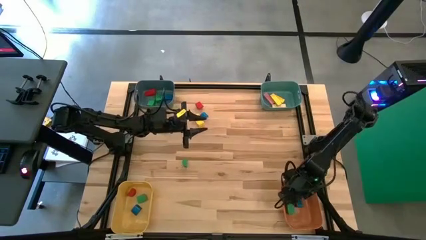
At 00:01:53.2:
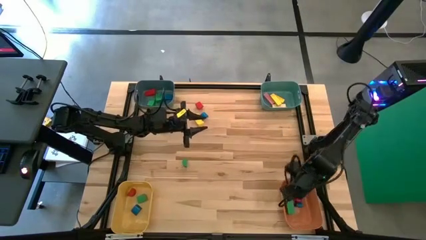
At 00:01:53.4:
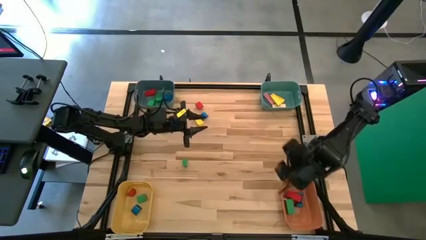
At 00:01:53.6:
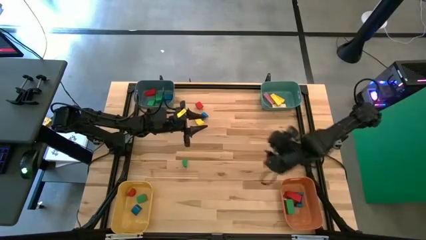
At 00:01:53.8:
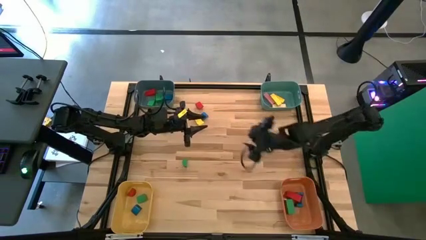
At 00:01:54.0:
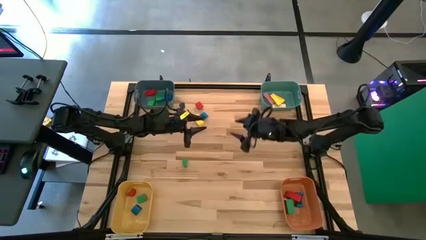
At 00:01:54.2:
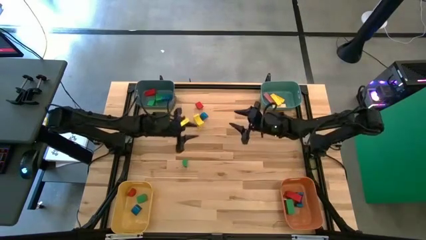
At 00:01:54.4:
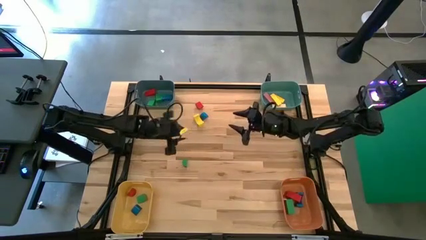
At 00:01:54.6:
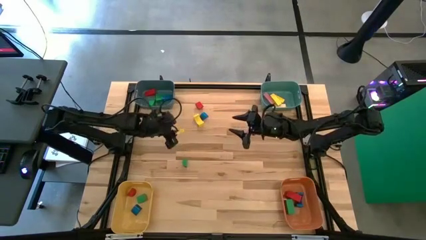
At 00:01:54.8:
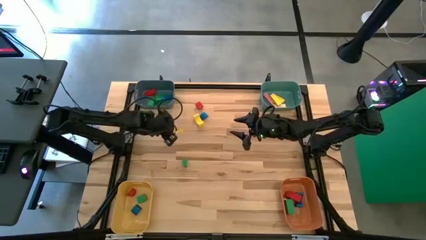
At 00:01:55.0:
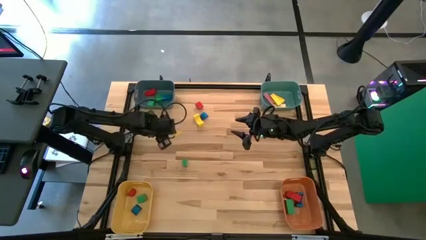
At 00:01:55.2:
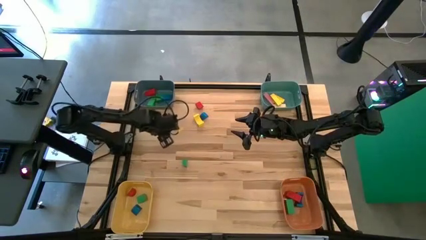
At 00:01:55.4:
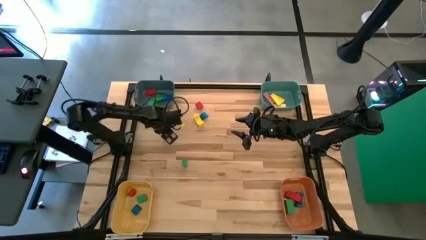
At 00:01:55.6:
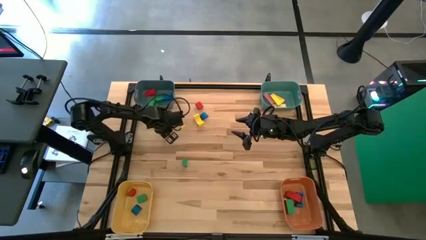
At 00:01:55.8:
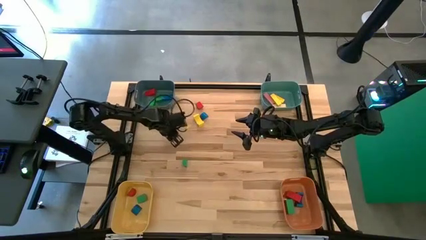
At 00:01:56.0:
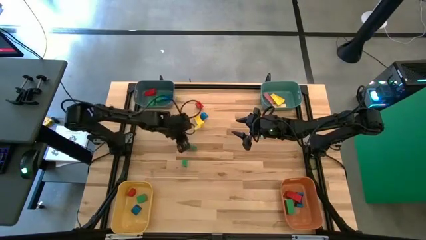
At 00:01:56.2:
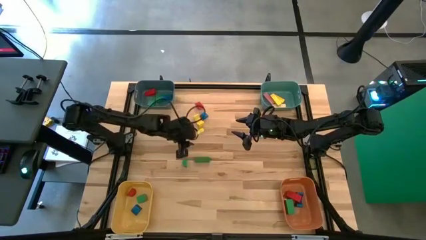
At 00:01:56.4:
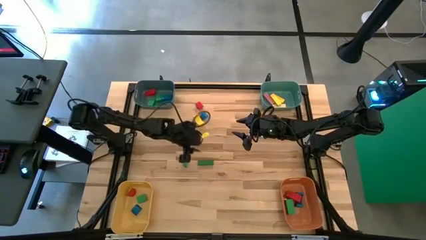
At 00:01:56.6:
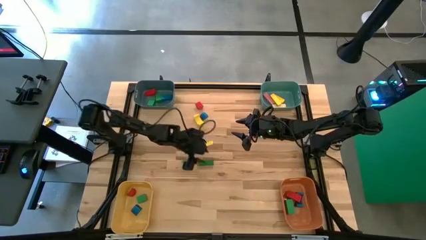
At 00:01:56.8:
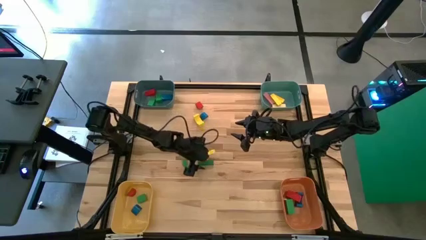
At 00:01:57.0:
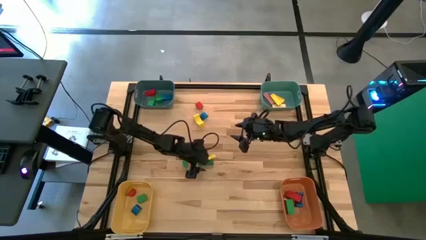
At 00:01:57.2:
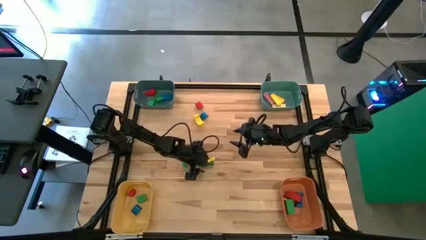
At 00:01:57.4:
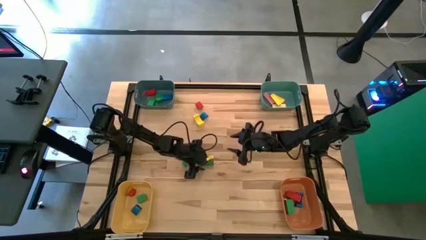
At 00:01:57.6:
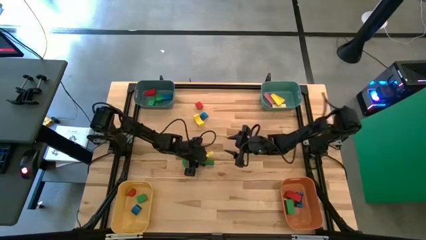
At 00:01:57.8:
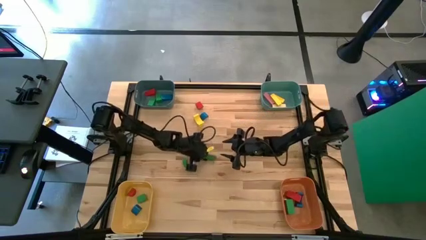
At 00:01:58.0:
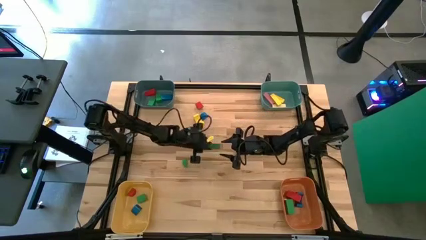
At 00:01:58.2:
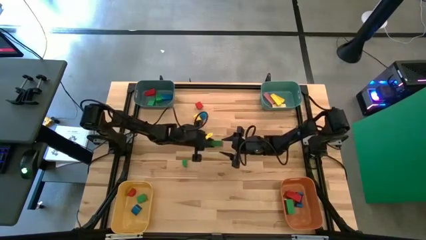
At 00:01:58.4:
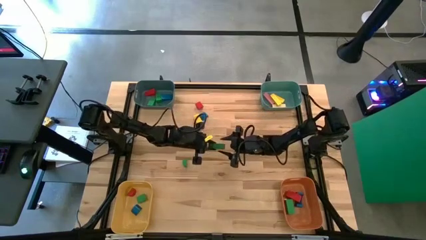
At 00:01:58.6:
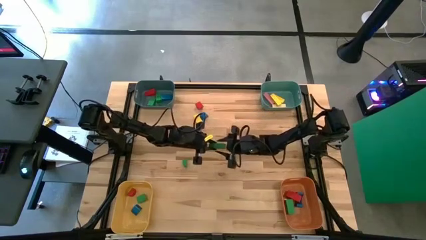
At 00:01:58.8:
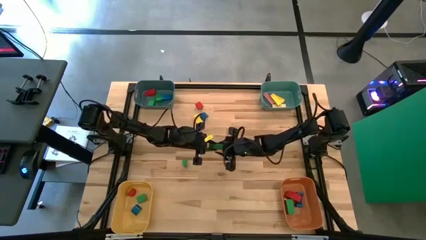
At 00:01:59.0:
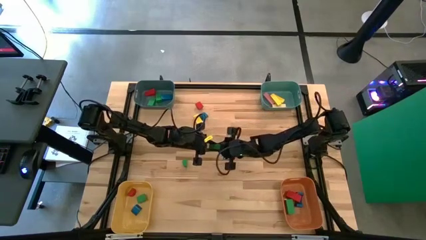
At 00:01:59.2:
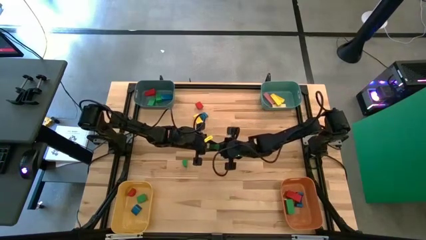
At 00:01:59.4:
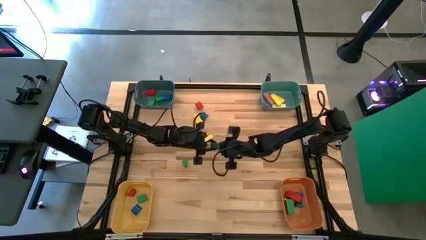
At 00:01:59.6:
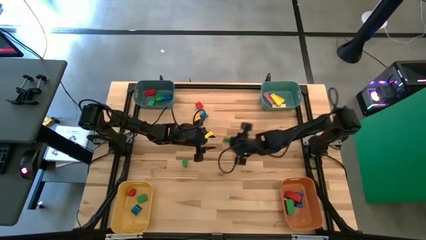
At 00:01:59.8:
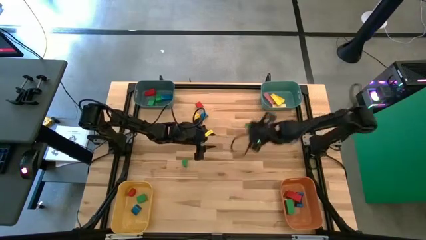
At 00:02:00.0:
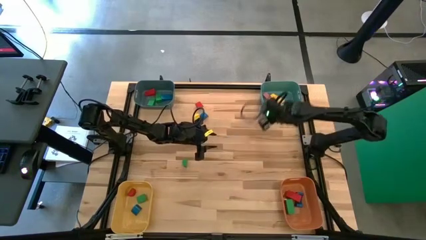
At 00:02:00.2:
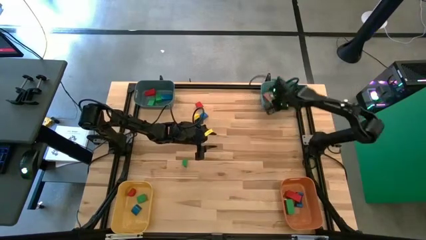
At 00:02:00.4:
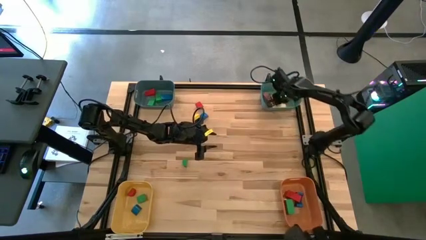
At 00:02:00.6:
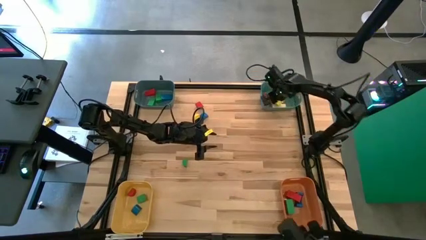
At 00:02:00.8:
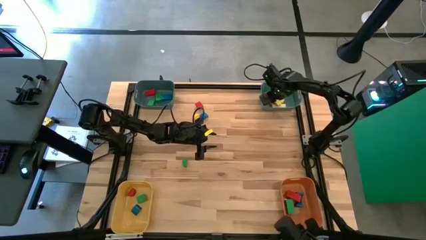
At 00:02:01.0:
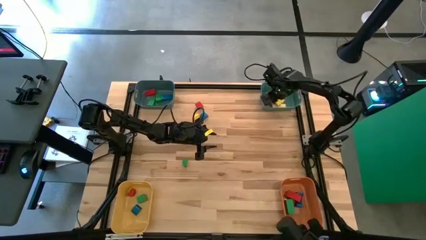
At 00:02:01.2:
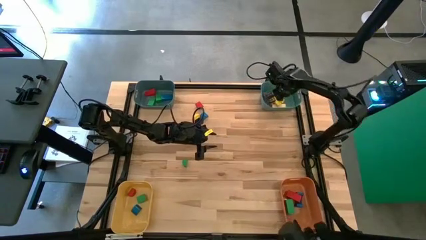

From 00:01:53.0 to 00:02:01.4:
Task: Sort blocks by size
Put the green rectangular block into the green bin

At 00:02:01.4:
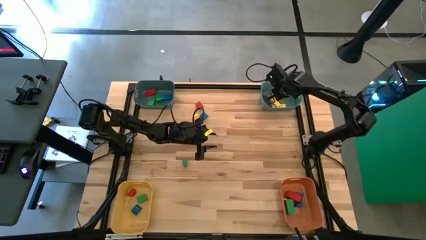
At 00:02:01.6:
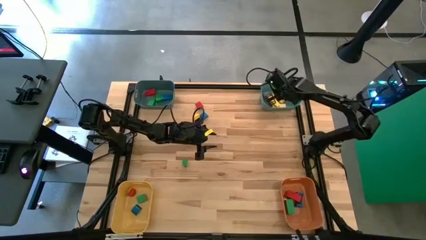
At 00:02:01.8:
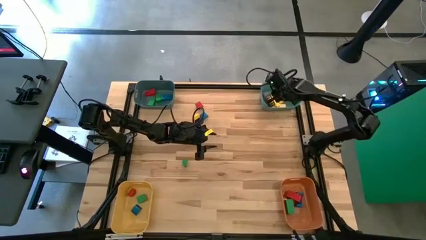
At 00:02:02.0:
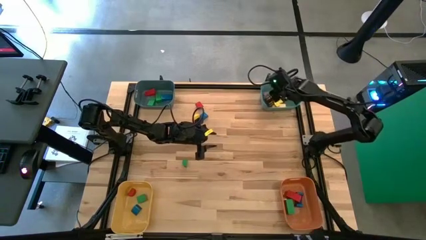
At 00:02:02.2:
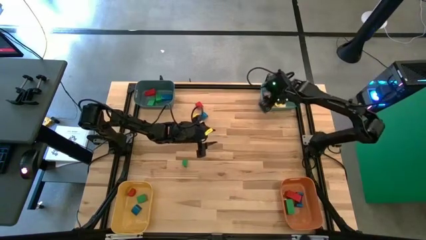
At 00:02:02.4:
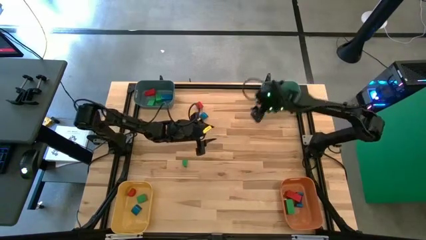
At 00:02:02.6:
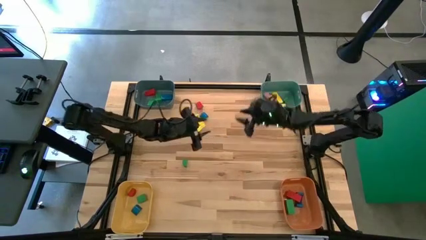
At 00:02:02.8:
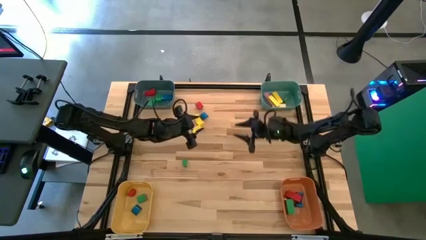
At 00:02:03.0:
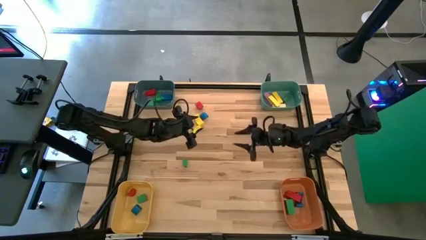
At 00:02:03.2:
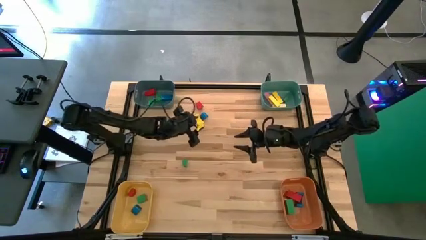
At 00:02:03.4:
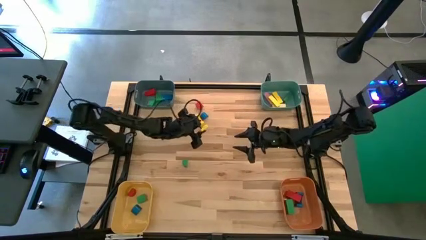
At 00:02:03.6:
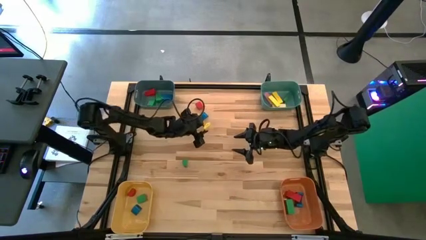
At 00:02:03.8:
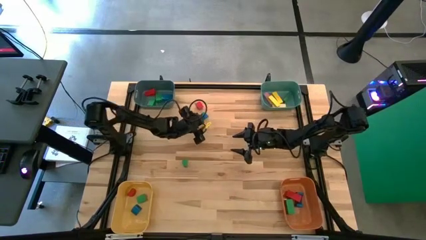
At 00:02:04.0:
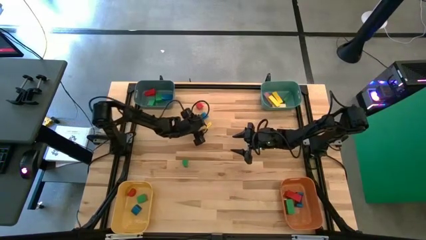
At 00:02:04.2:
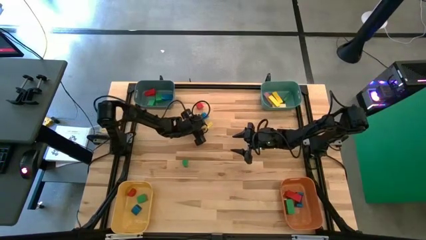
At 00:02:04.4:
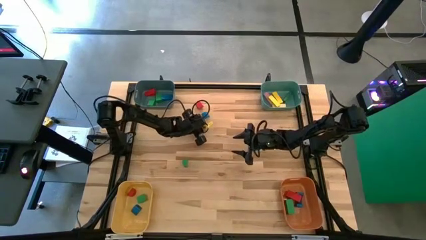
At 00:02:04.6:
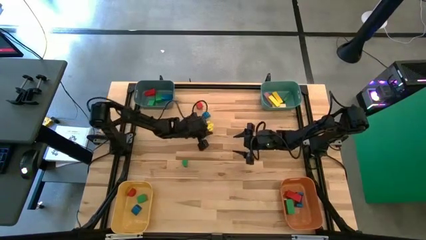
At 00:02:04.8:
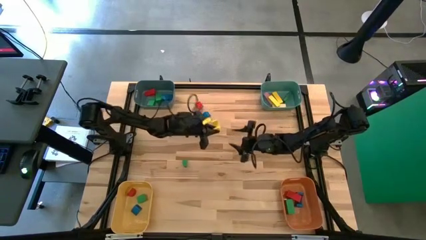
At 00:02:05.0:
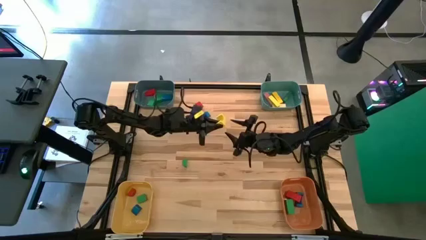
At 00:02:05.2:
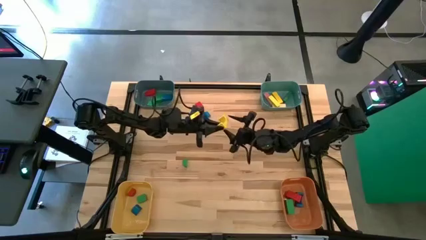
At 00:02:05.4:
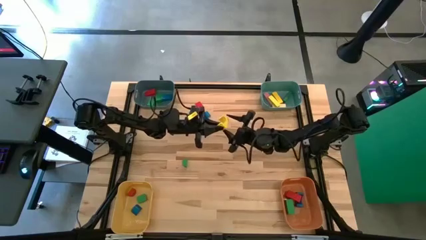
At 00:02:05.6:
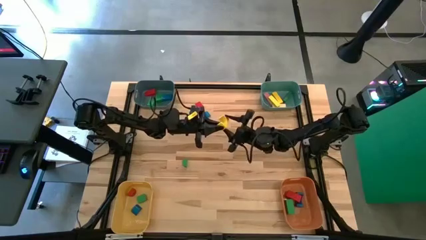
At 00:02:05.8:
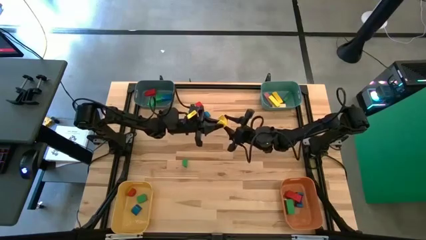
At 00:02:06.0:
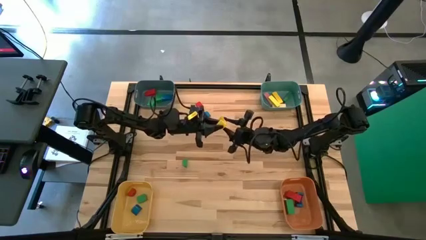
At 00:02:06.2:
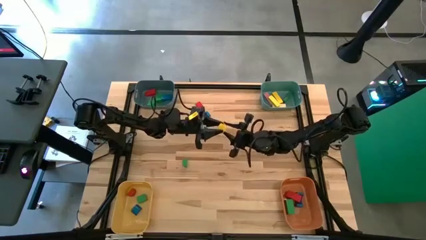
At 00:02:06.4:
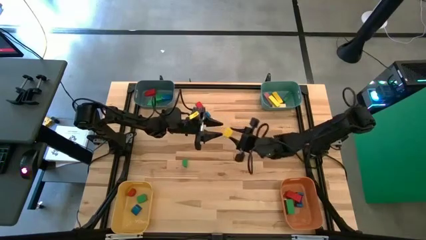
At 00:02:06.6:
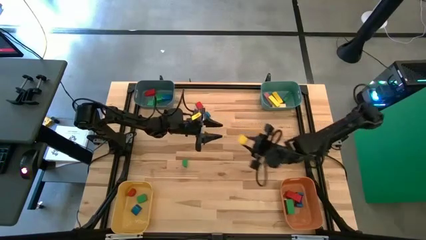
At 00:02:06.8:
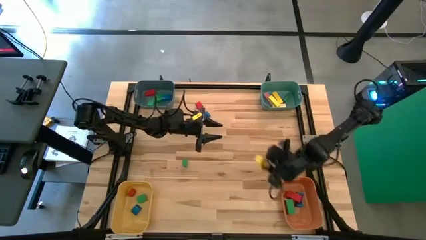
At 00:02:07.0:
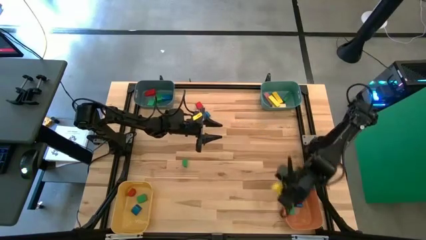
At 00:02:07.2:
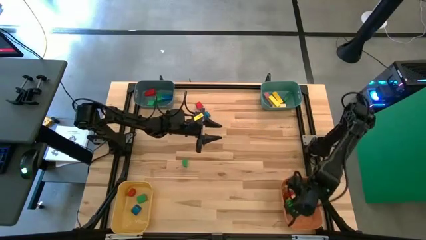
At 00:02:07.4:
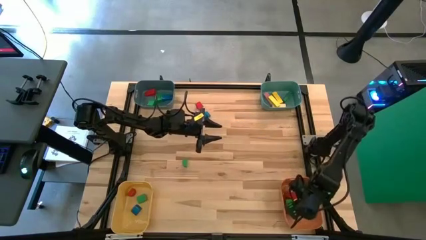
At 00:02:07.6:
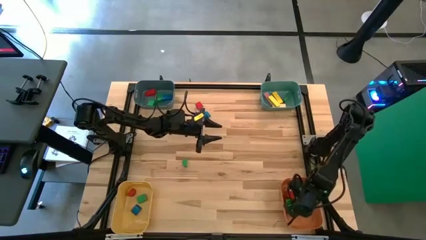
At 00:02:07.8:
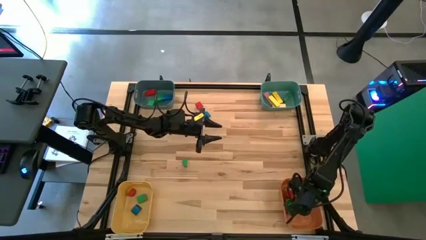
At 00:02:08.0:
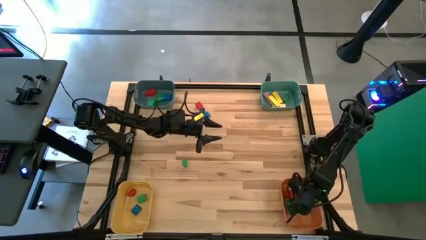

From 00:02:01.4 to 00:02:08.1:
Put the yellow arch block into the orange bin
